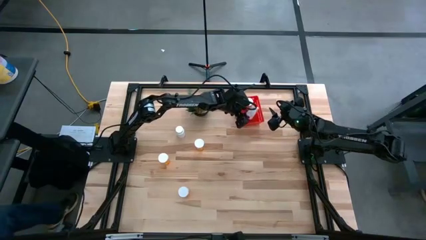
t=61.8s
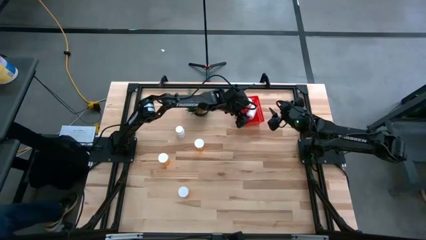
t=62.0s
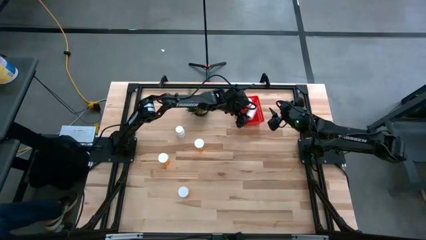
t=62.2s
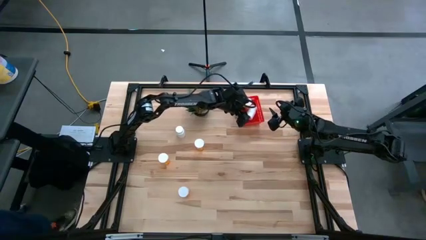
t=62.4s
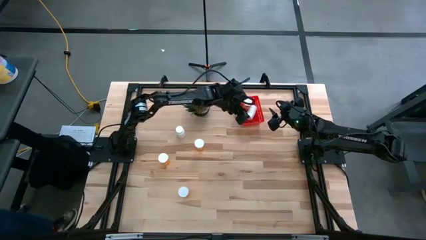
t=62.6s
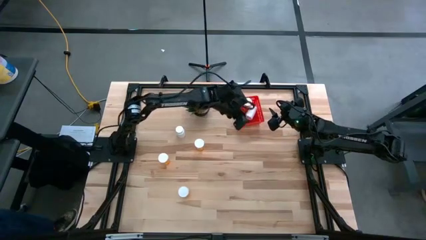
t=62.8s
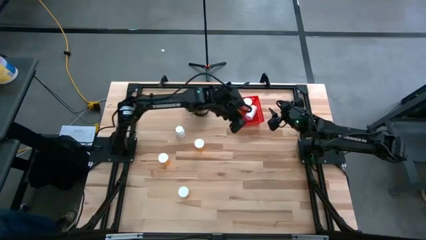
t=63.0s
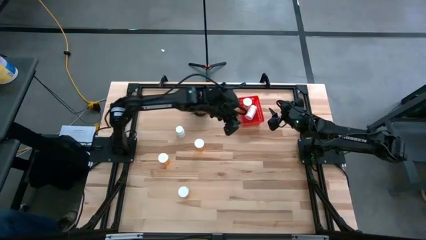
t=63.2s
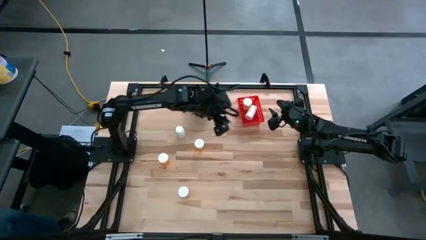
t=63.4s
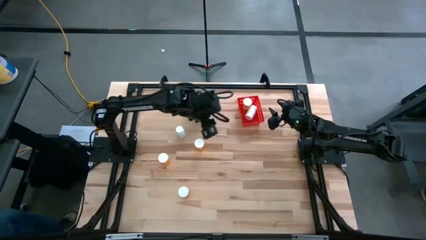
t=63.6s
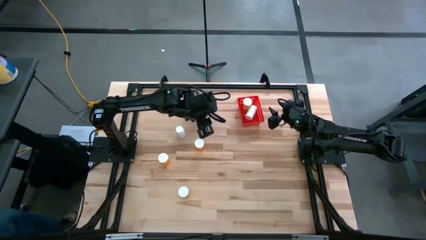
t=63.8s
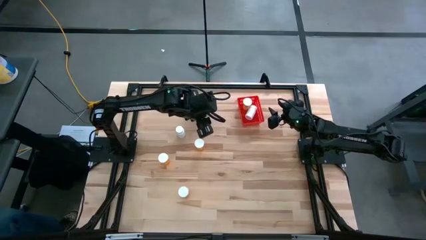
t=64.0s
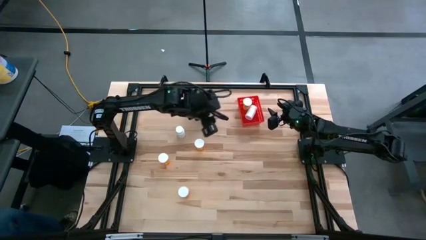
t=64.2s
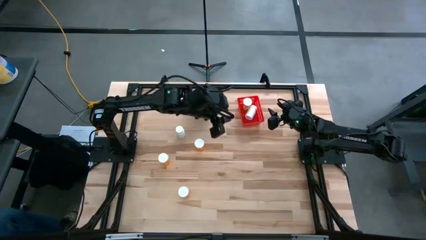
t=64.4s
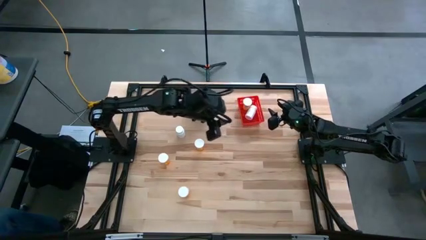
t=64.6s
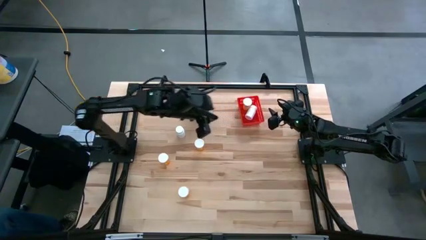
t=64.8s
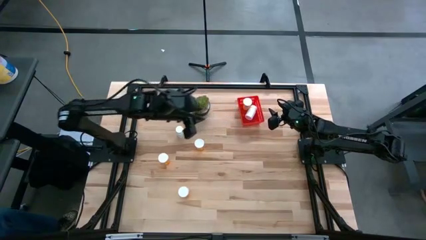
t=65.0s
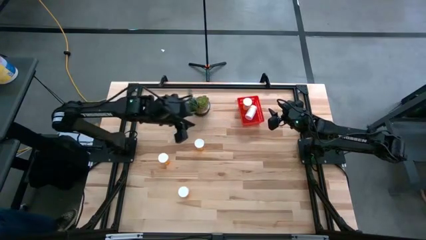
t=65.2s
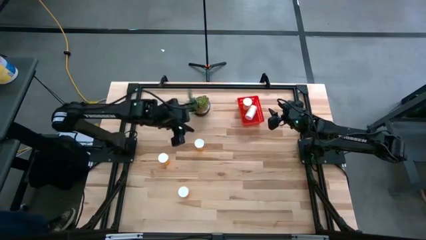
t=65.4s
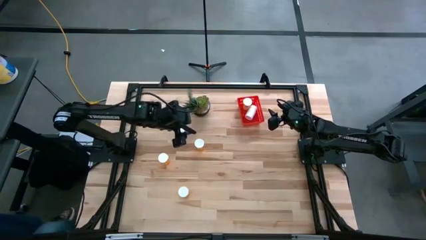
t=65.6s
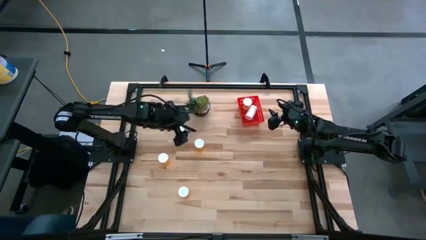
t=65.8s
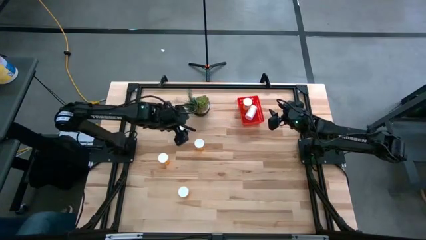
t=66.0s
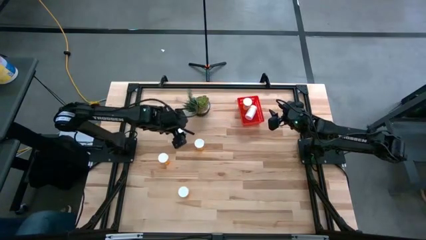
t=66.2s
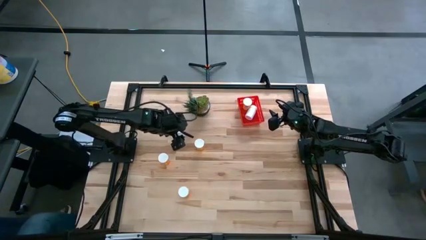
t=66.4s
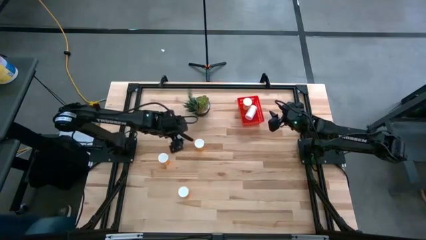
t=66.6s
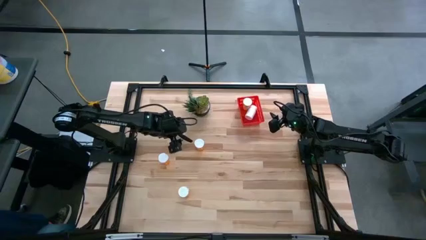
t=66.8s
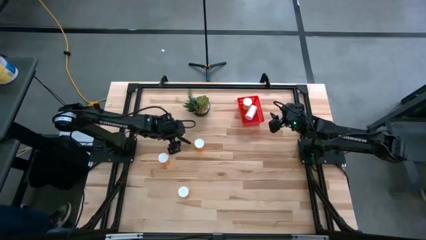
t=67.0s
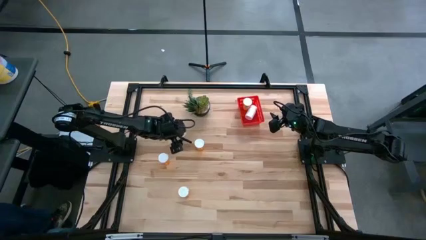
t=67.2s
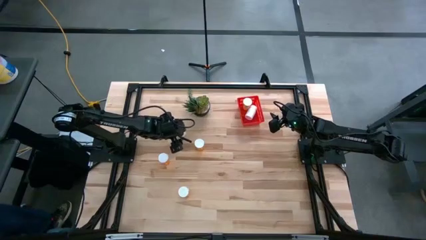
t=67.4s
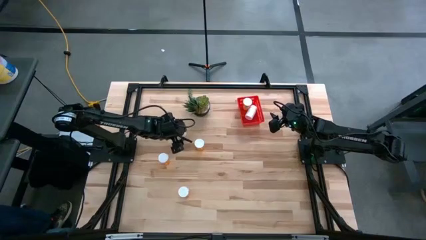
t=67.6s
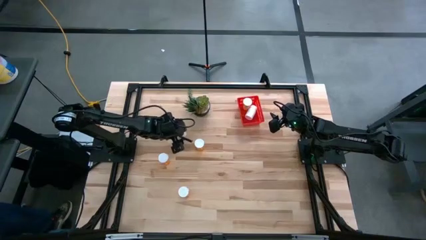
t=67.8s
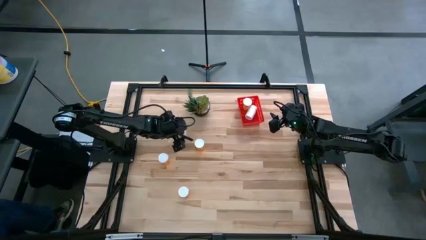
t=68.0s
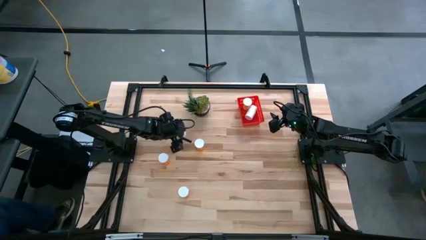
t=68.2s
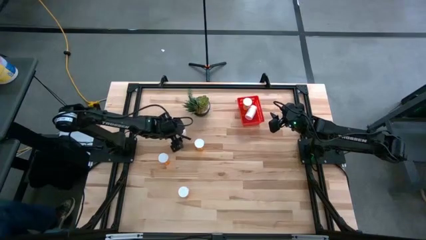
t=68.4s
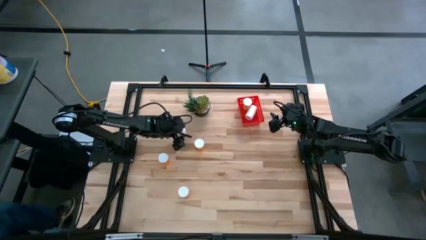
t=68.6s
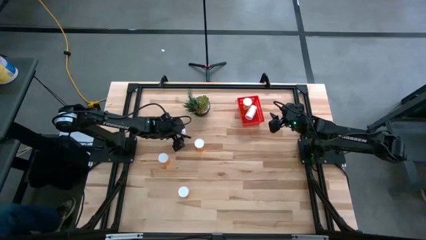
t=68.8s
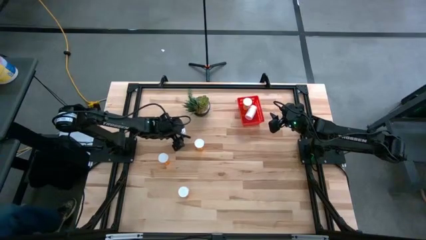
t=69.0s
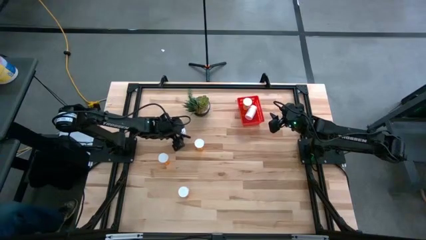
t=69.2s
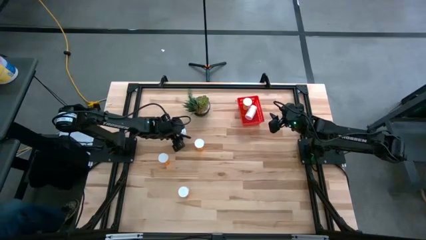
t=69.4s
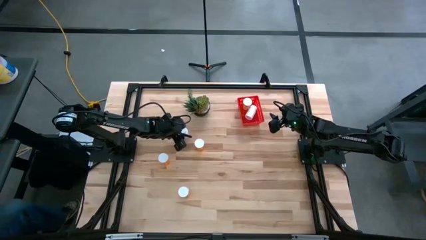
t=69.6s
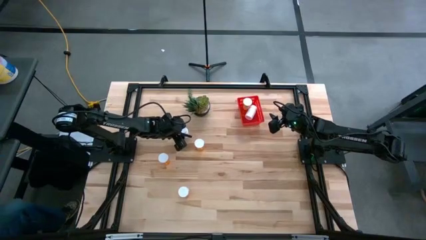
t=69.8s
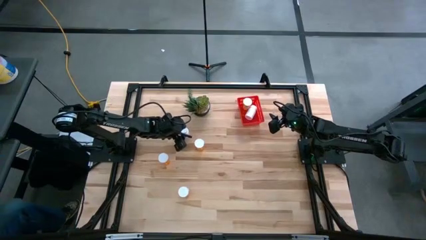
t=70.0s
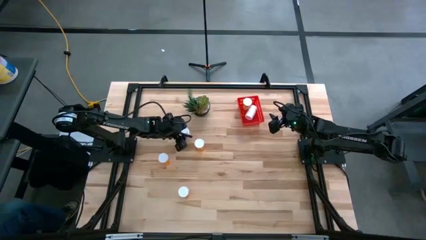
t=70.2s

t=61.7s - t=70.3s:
Task: Pick and place pill bottles into a basket
Put the white pill bottle into the bin

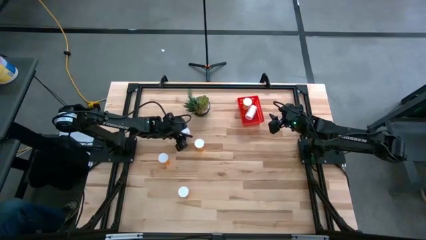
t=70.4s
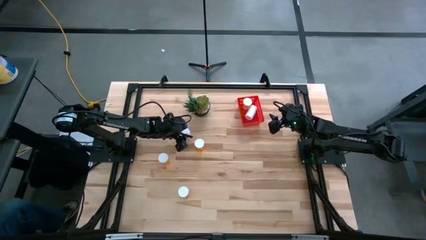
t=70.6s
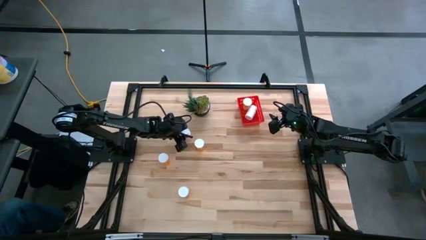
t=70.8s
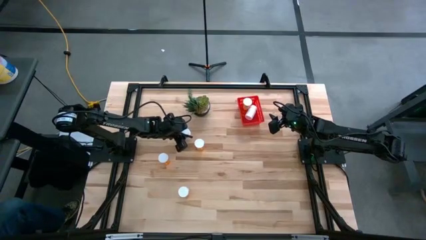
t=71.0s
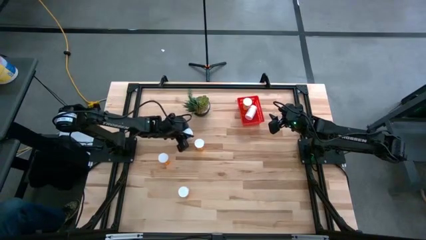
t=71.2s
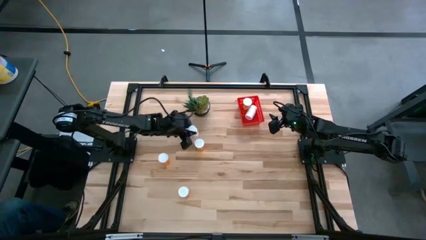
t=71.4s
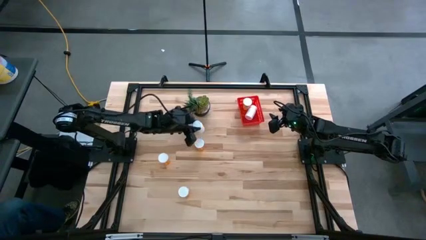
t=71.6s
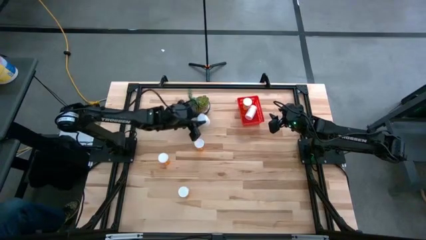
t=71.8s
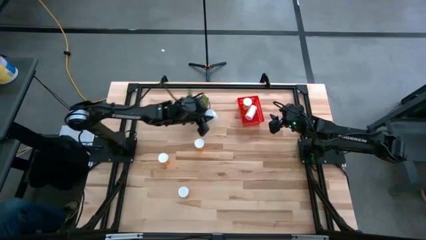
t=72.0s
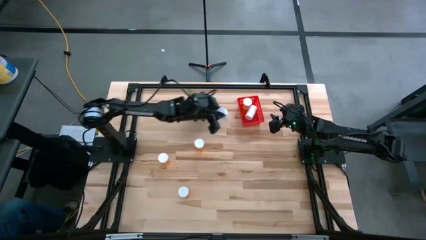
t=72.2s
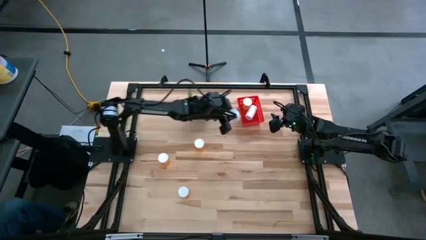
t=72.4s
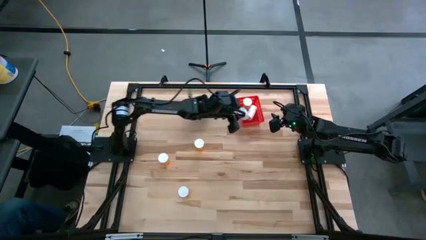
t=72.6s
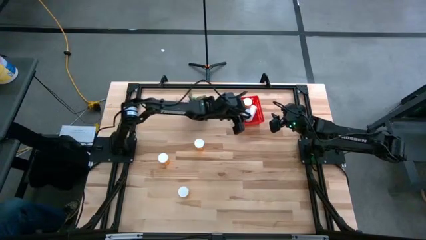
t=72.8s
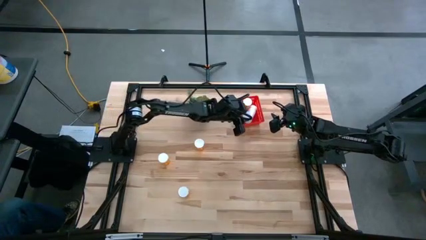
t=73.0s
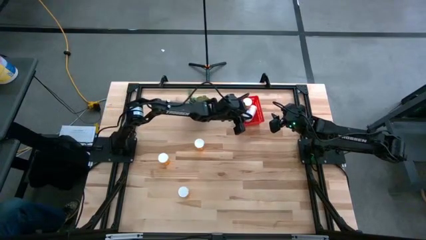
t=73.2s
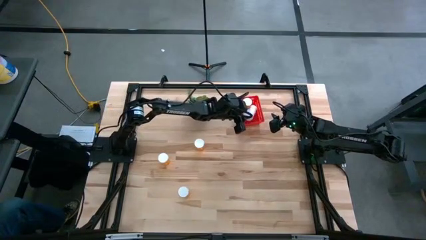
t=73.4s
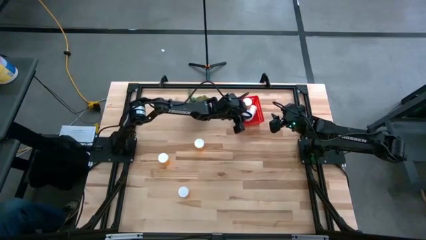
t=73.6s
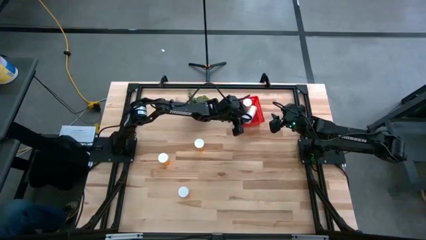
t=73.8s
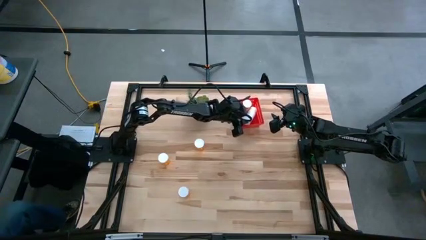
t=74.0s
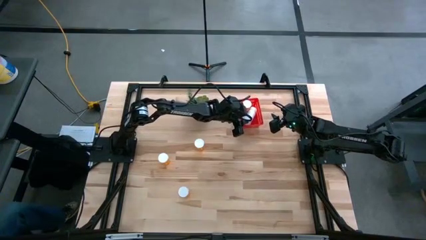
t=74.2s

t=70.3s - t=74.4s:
Put the white pill bottle into the bin

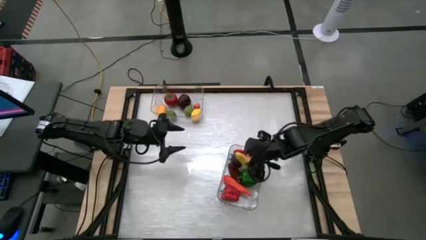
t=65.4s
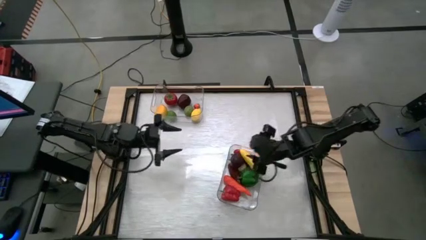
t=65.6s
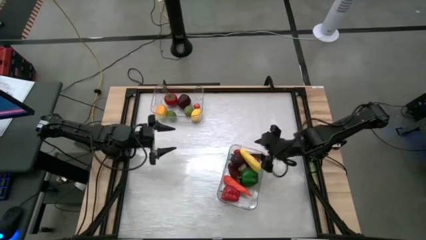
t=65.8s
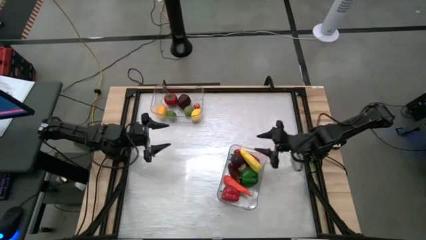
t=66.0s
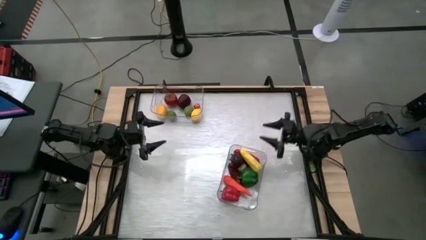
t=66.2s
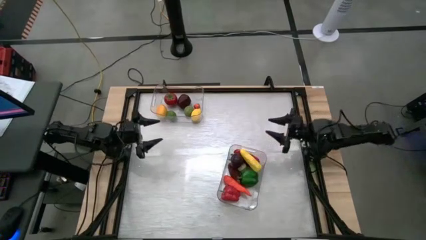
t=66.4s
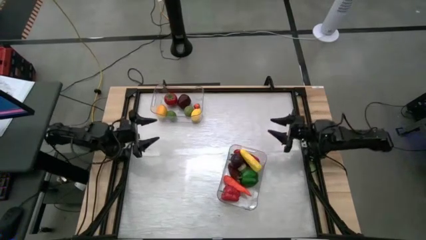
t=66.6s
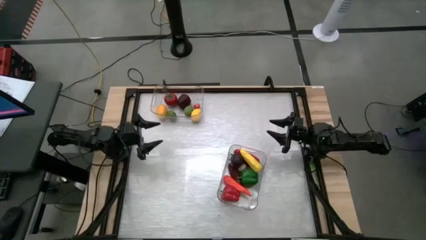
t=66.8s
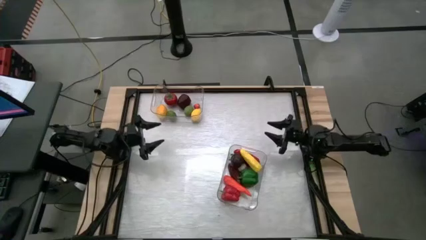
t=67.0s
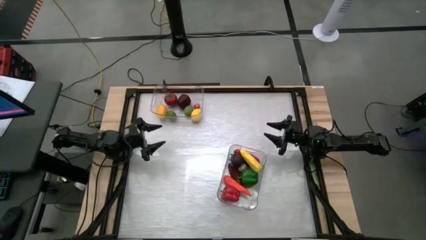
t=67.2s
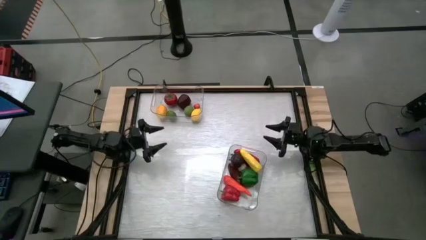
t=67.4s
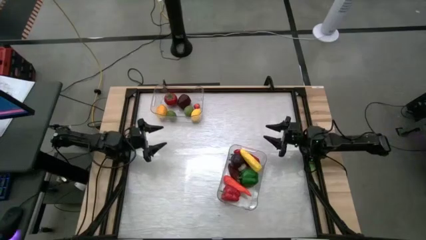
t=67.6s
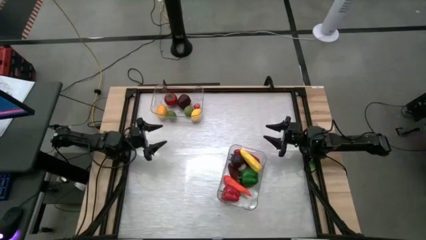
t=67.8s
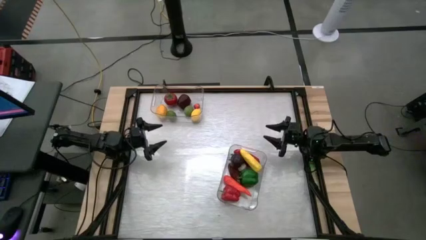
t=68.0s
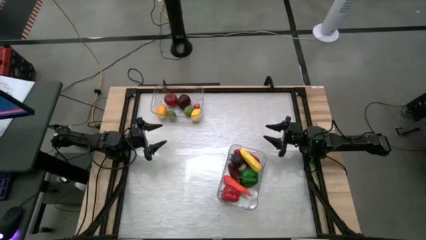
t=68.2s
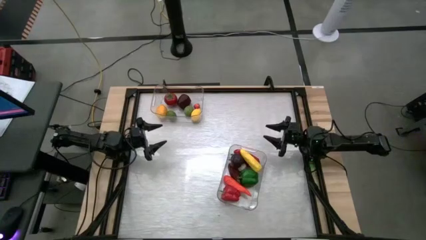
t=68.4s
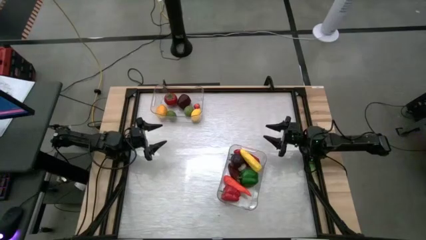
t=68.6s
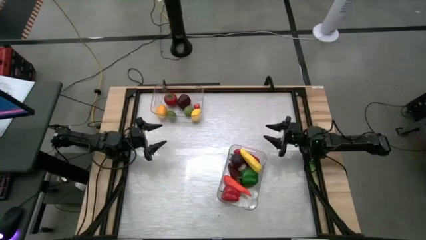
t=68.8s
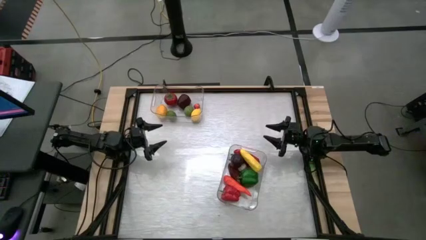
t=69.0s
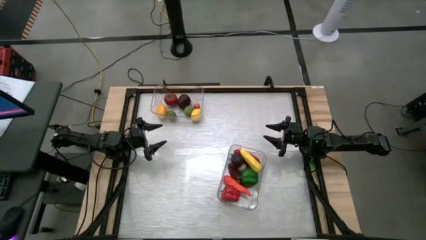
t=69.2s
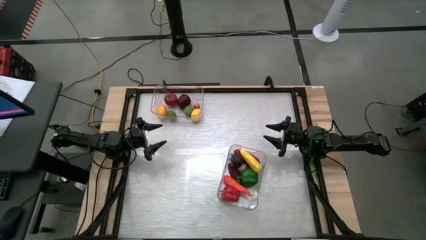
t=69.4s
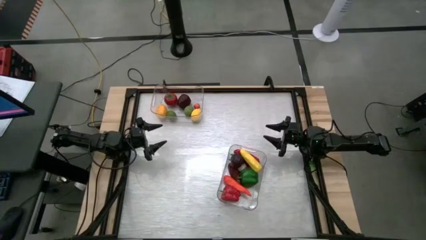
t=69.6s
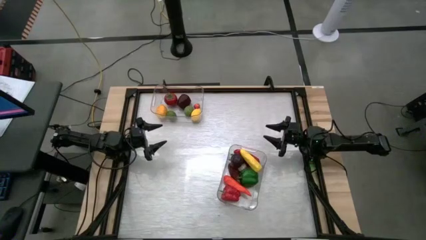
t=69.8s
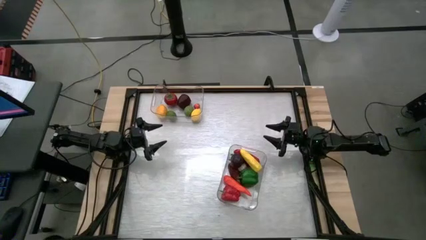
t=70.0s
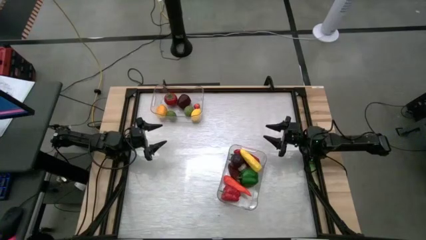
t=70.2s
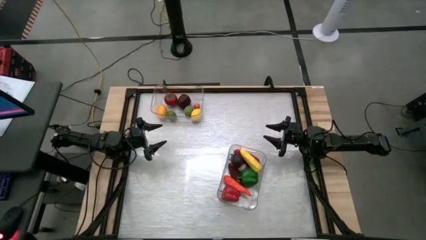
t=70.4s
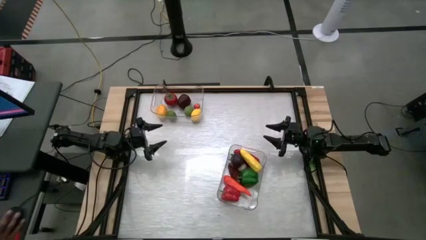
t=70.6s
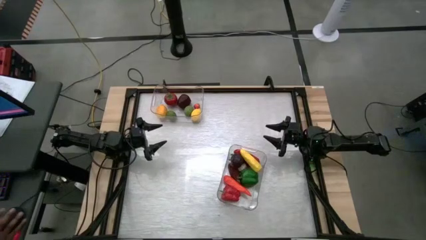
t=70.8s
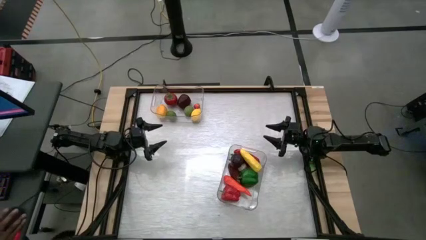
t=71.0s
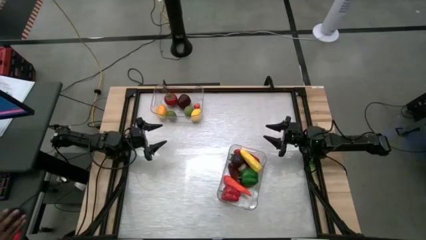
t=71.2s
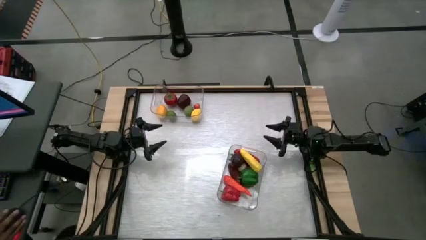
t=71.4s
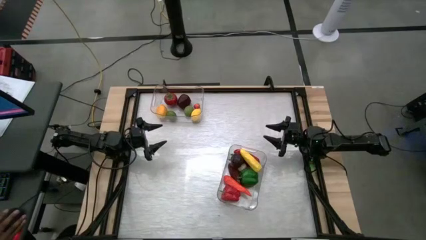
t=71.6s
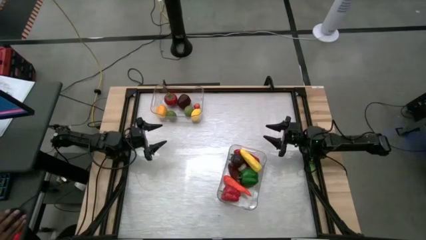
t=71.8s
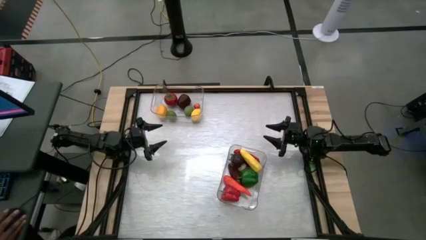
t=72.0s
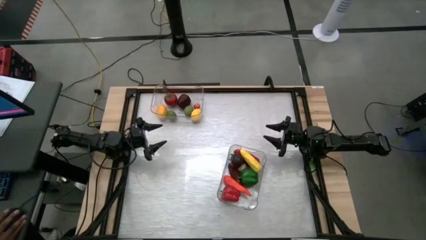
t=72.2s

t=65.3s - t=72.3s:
Task: Sort produce into baskets
Return to Home Position
